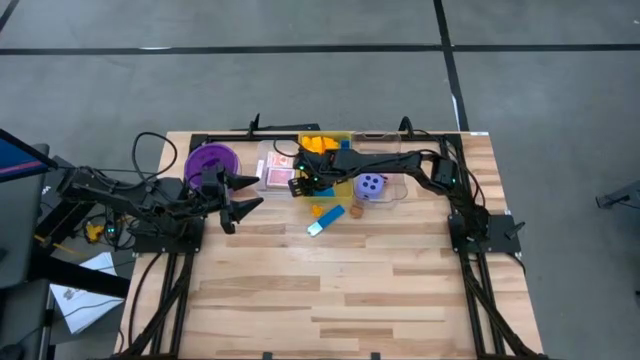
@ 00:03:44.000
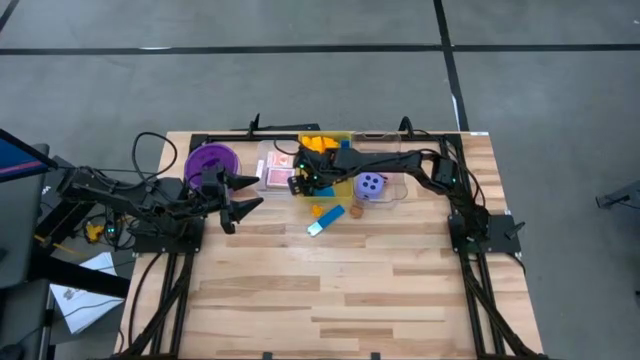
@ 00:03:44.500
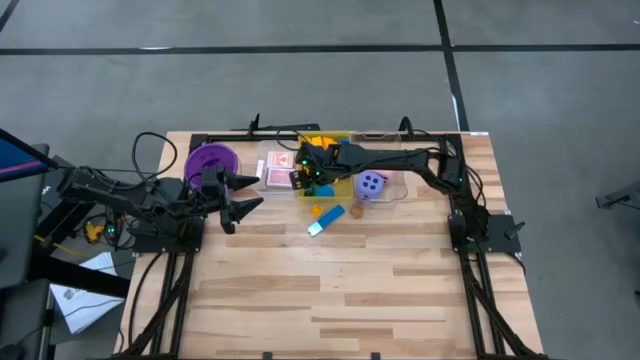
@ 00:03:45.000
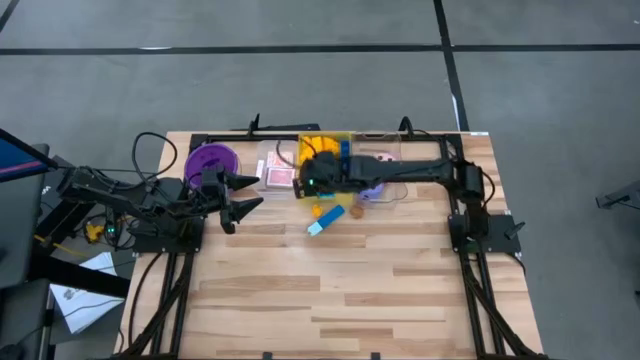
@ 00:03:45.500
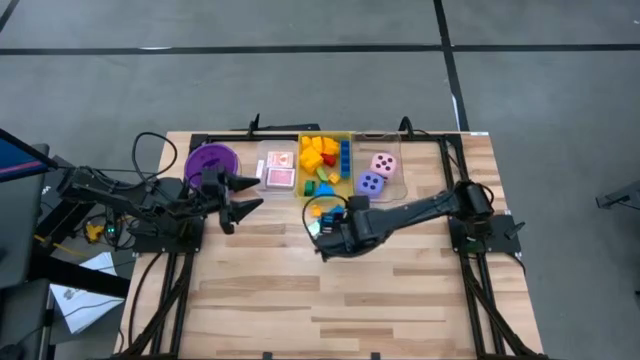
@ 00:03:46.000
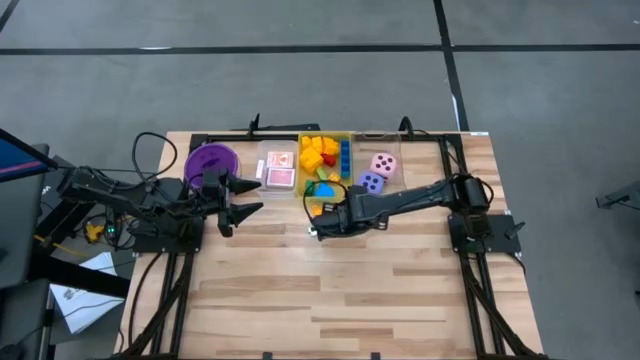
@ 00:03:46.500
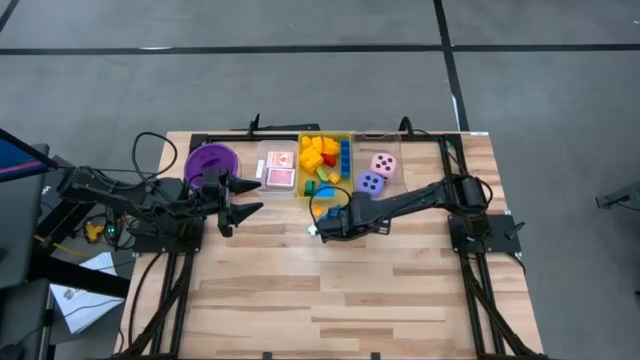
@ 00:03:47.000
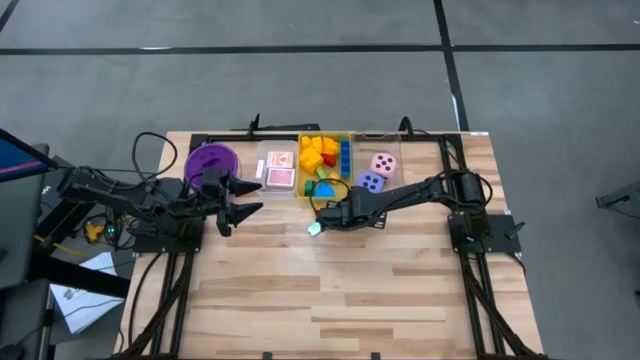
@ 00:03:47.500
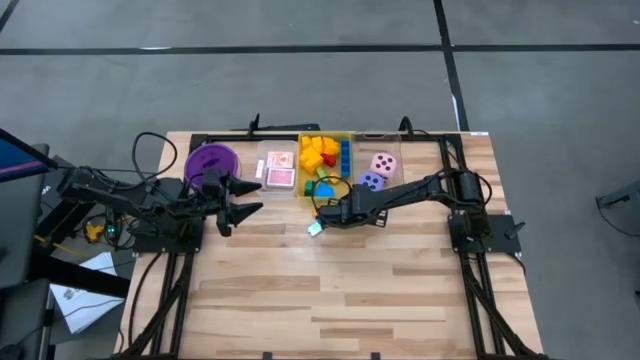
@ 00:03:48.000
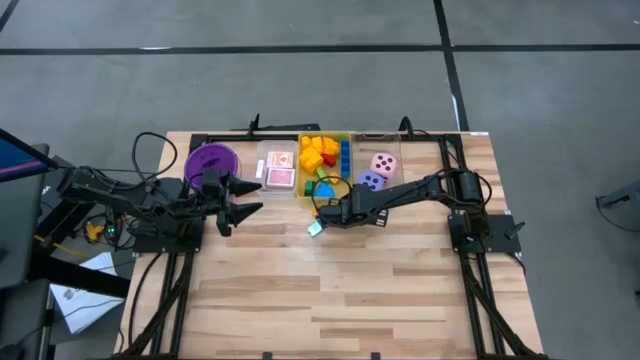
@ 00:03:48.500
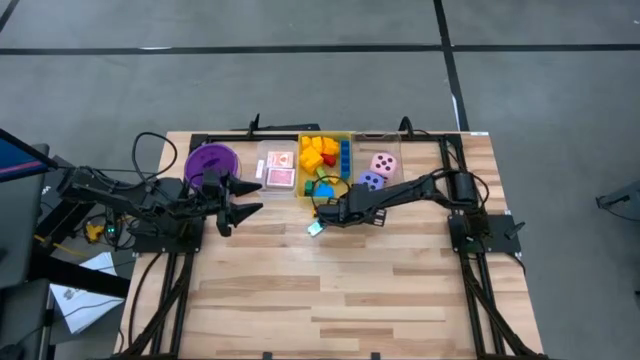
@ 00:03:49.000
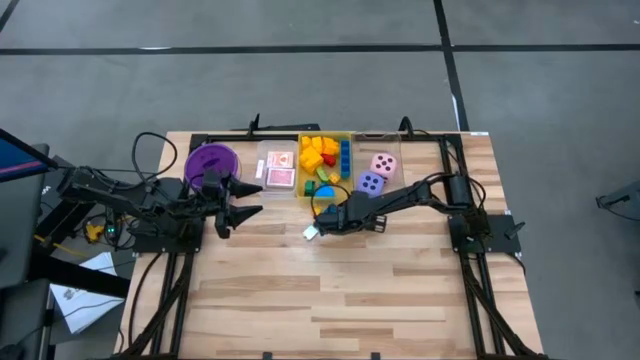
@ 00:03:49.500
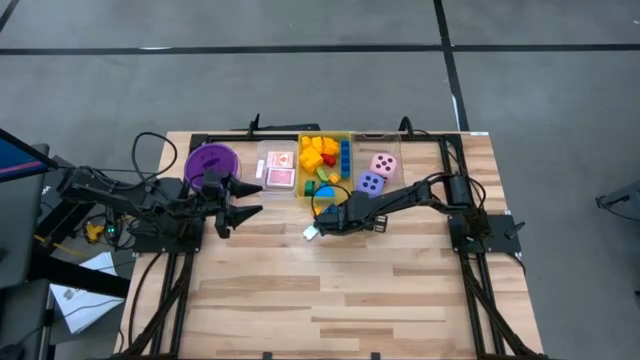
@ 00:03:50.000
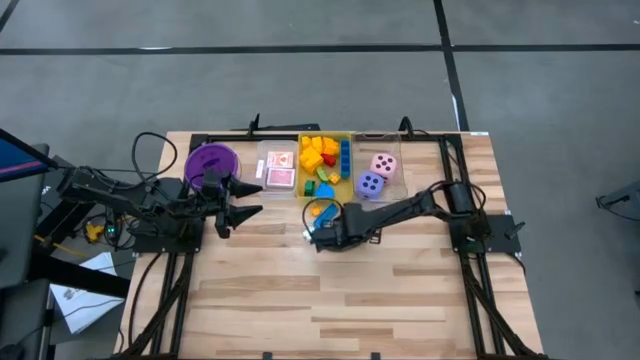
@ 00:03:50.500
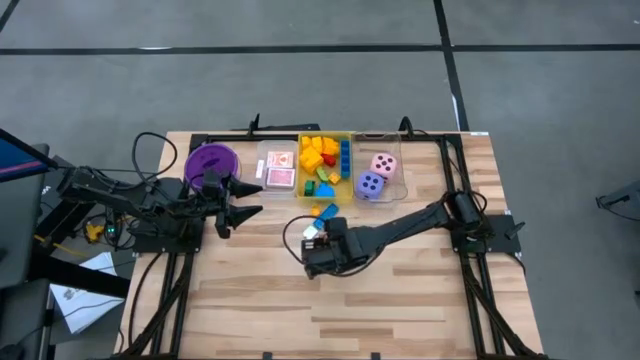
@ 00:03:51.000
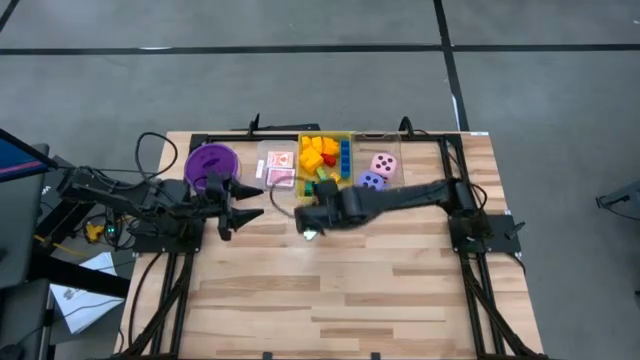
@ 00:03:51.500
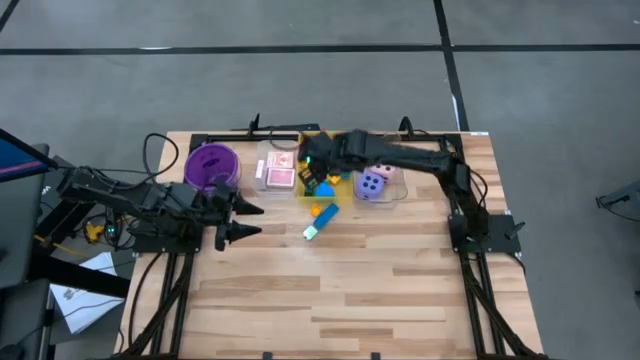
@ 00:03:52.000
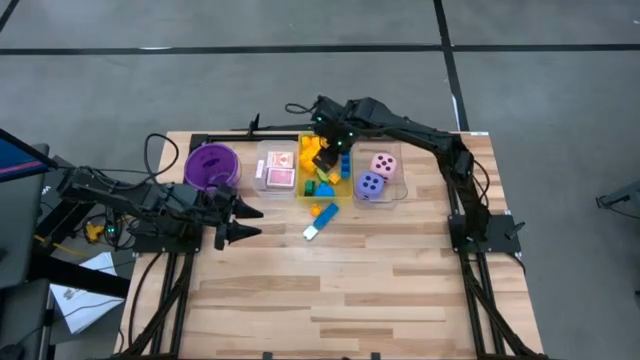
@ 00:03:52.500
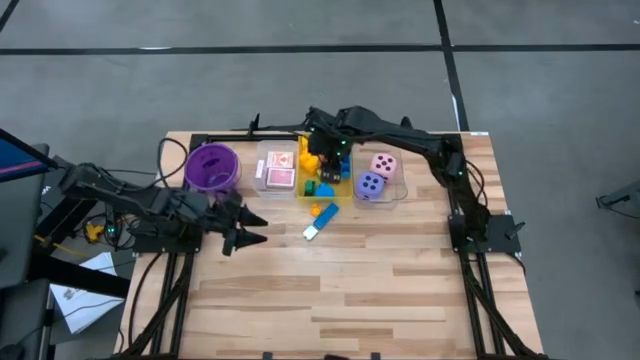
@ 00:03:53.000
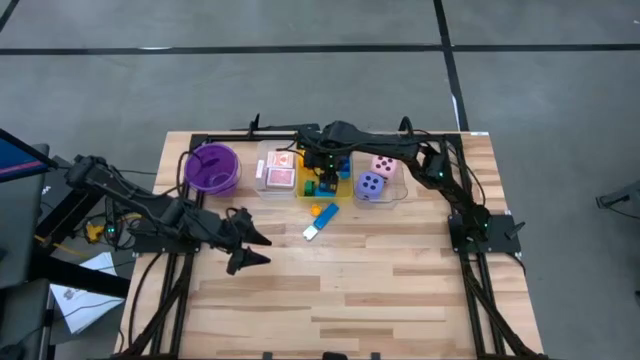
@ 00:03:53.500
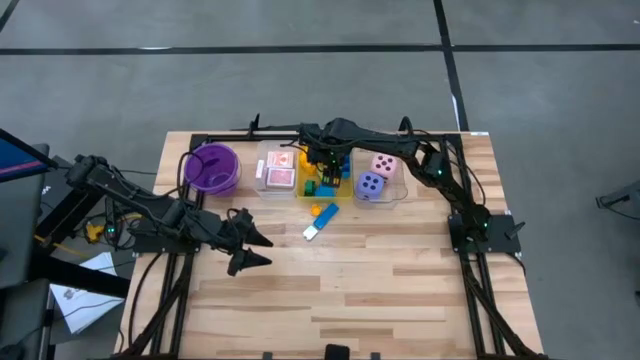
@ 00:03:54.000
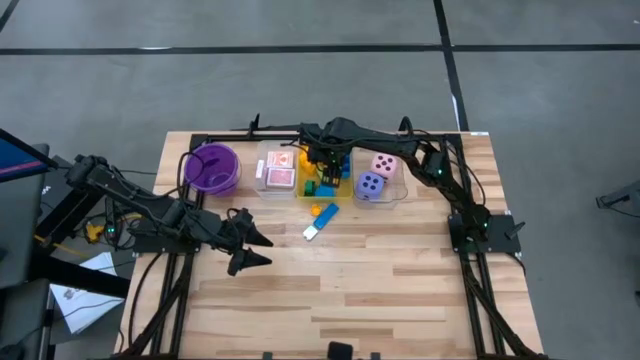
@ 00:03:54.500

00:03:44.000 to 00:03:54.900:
Task: Pick & Place Toys
Put the brown gamepiece into the yellow bin

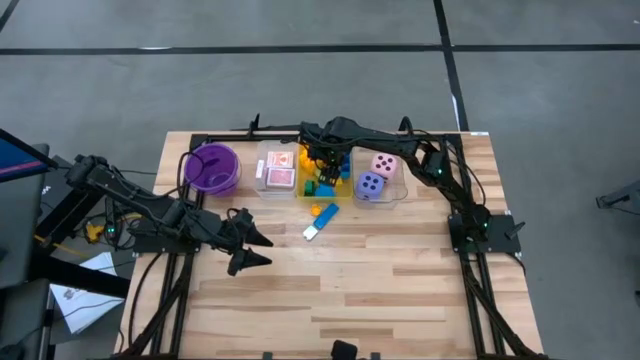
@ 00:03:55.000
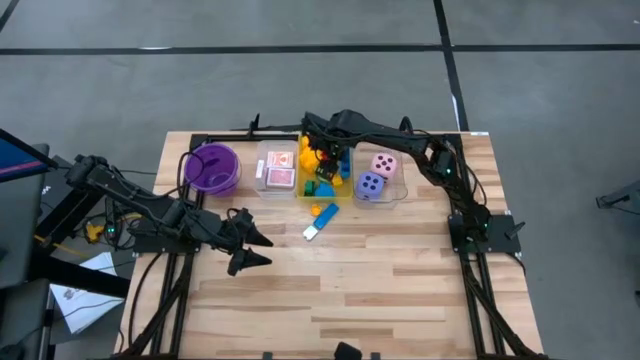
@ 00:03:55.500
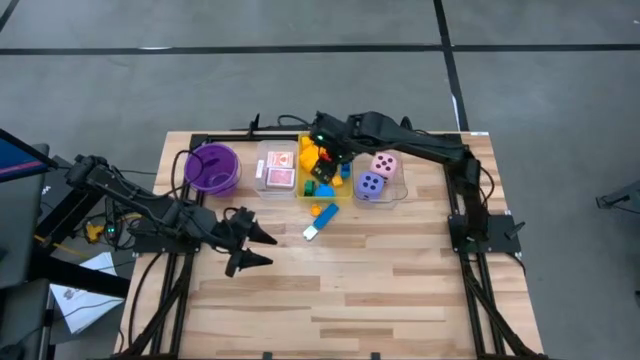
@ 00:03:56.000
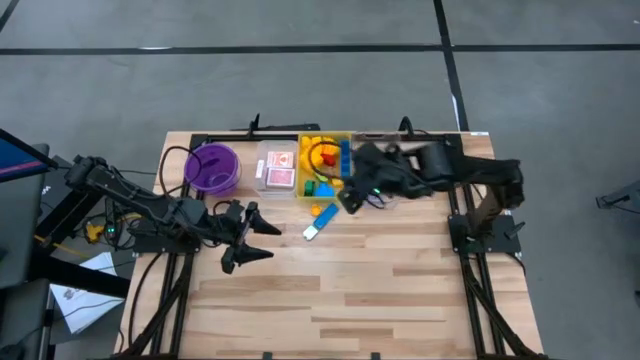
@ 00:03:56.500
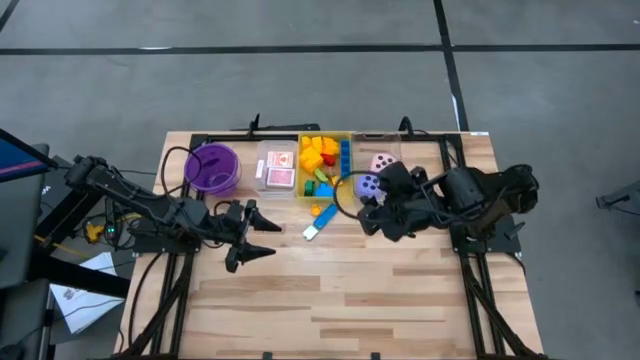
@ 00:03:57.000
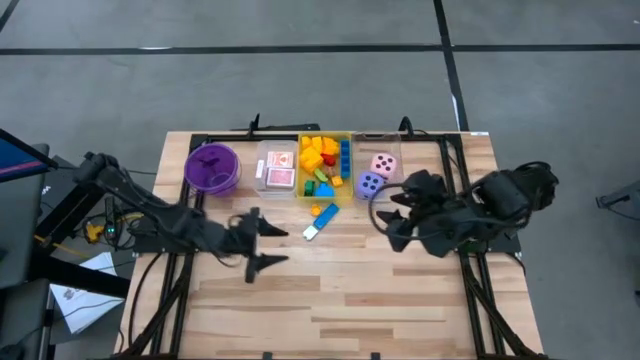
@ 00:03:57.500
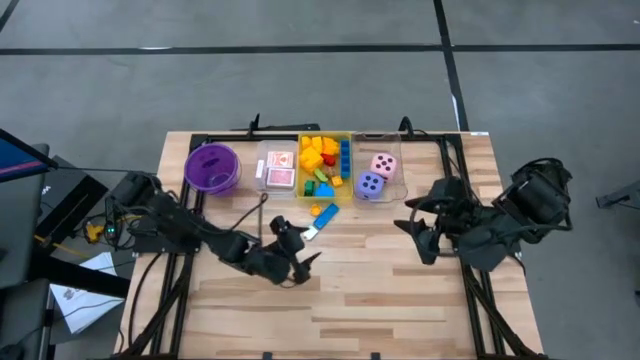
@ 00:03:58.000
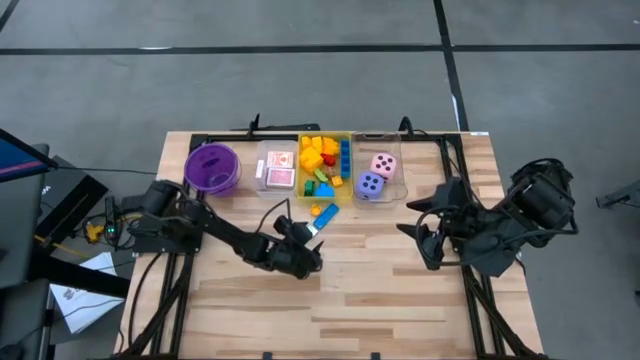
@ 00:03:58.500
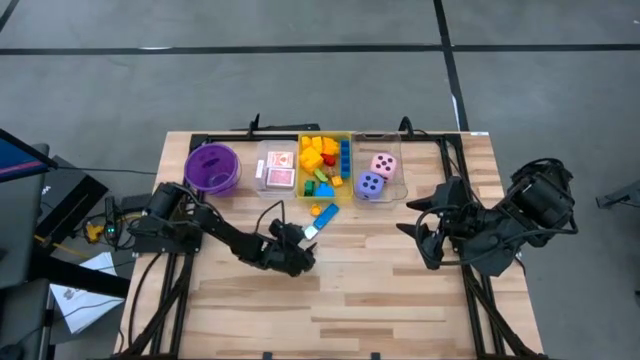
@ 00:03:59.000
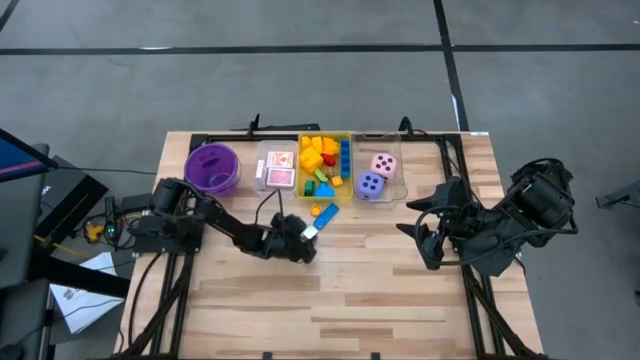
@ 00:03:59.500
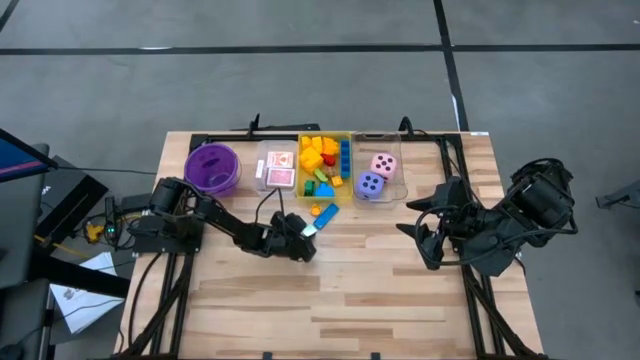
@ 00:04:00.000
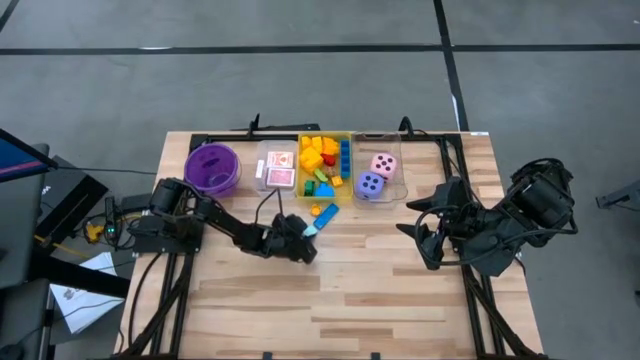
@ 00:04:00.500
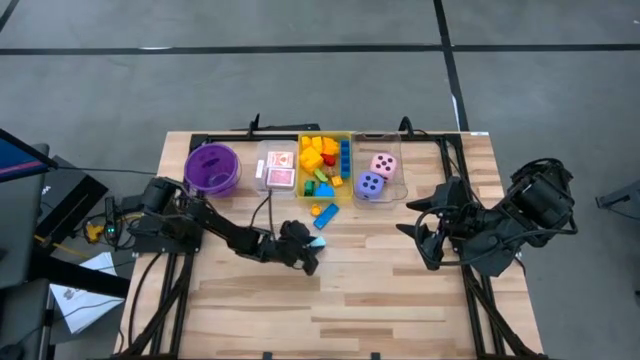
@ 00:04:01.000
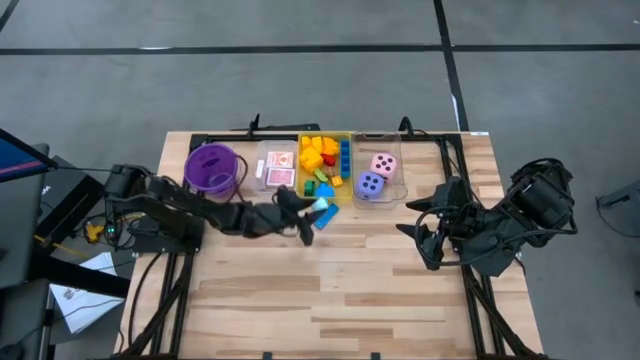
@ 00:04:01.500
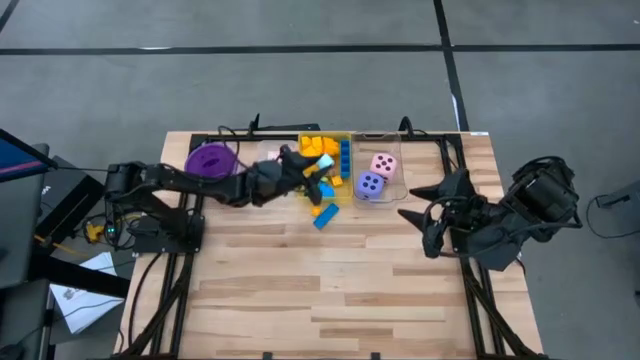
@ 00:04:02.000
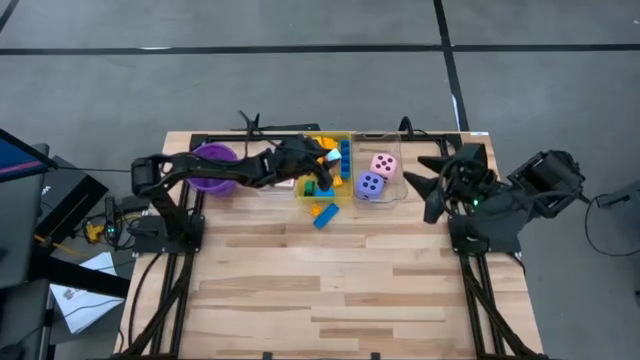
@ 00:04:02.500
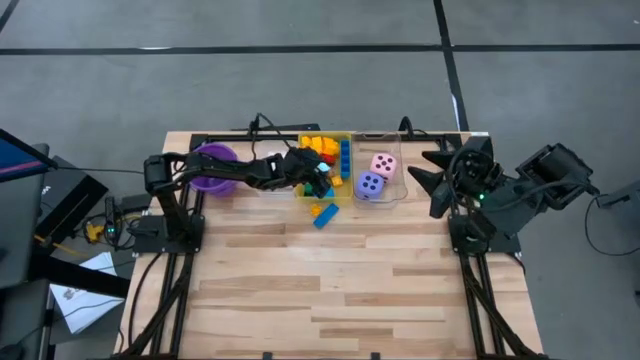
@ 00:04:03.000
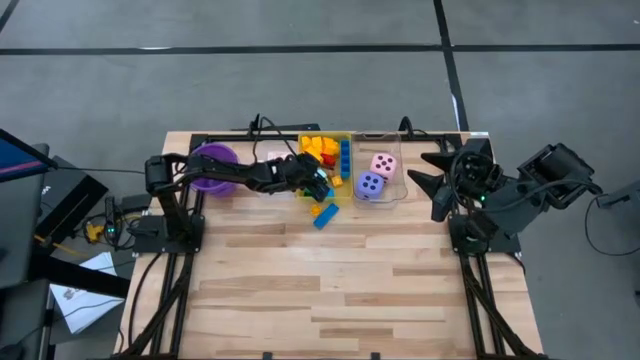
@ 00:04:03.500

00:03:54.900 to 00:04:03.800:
Put the light blue gamepiece into the yellow bin

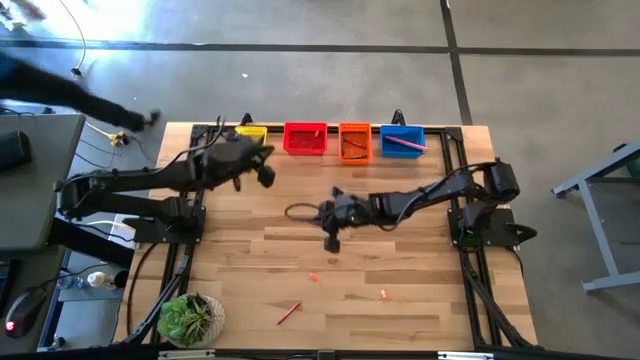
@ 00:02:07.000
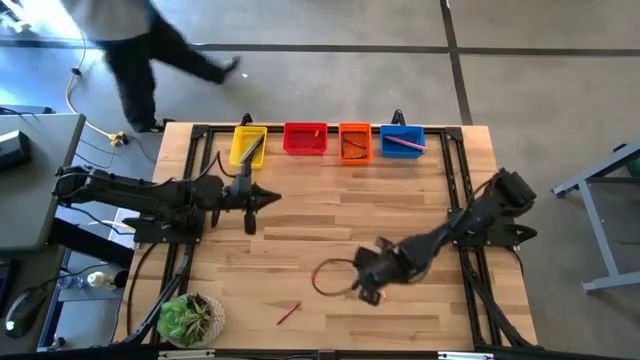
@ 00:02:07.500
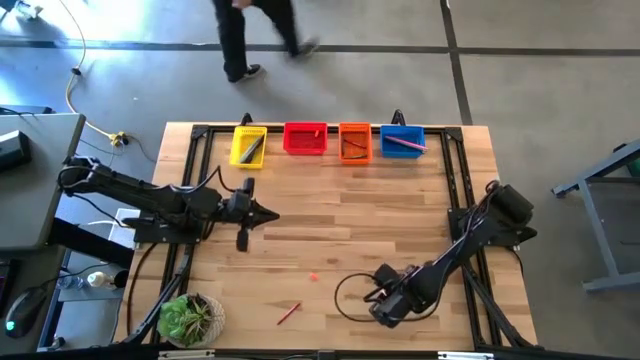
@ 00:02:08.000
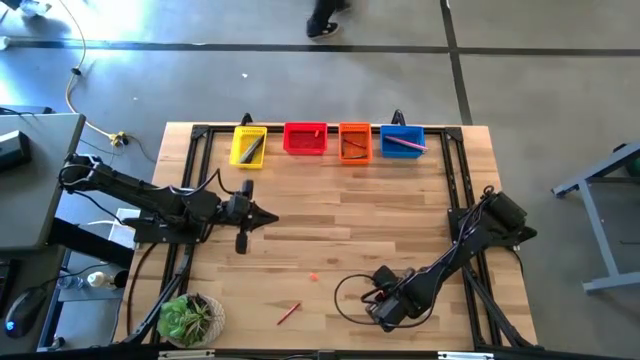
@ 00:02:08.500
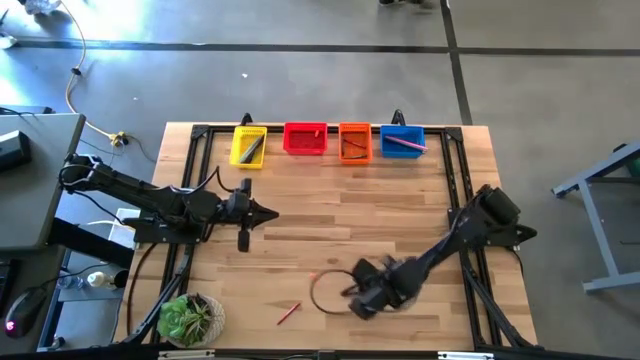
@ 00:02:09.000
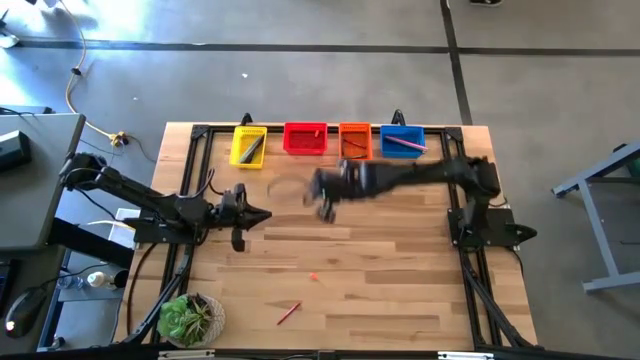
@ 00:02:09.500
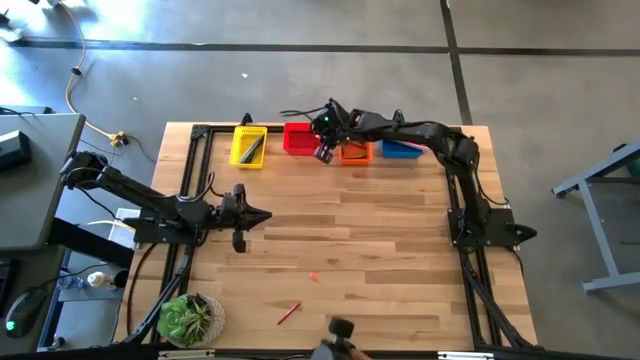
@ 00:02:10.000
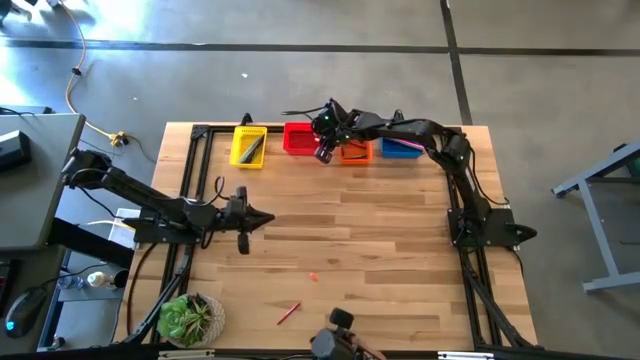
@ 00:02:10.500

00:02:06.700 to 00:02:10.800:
Task: Sort crayons/erasers/pens/pencils in bins
Put the orange eraser into the red basket
